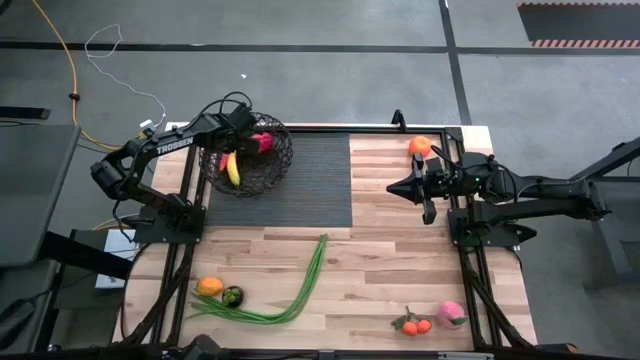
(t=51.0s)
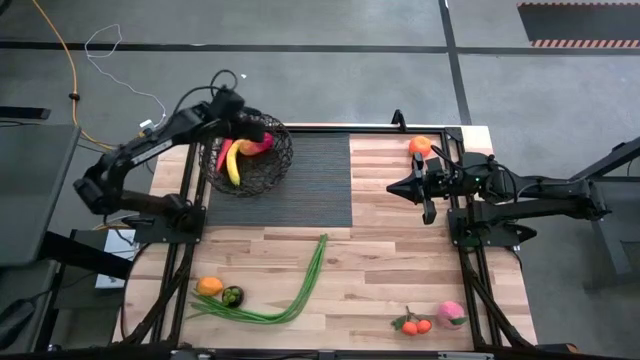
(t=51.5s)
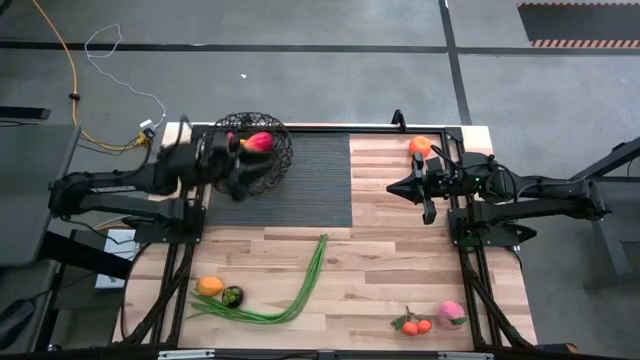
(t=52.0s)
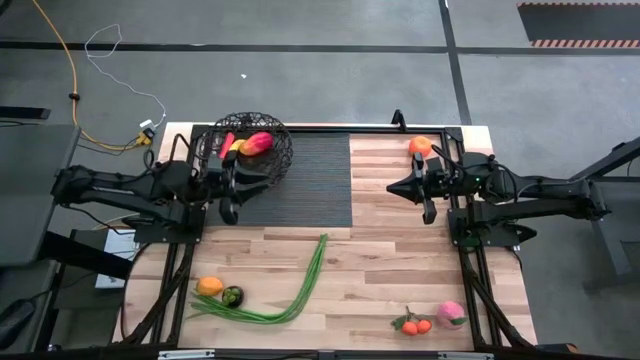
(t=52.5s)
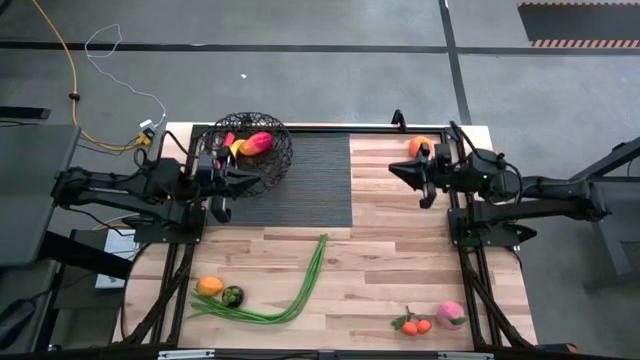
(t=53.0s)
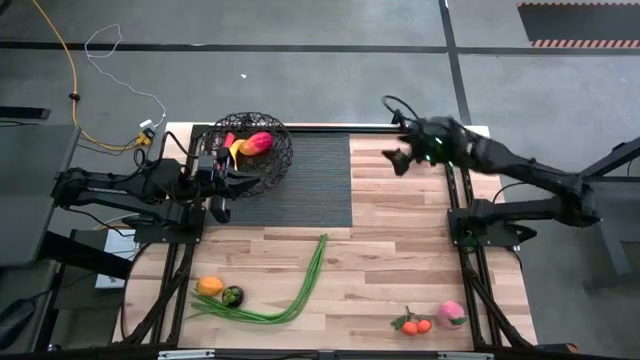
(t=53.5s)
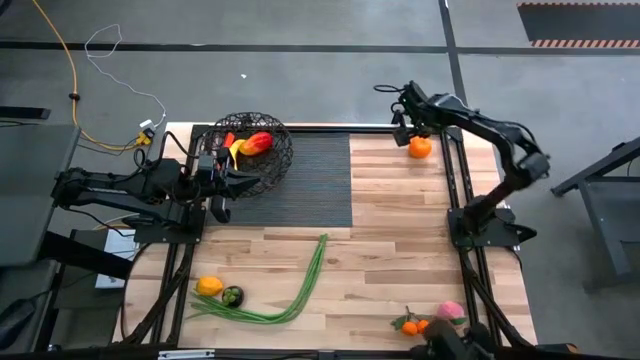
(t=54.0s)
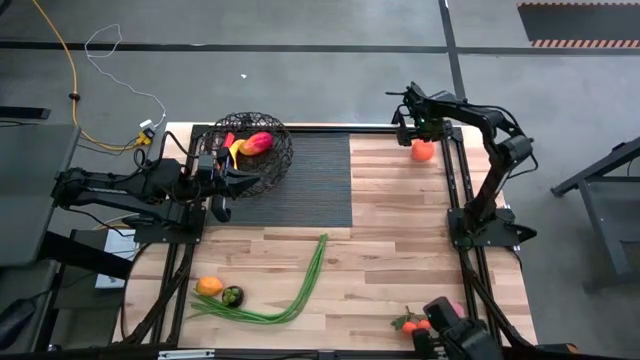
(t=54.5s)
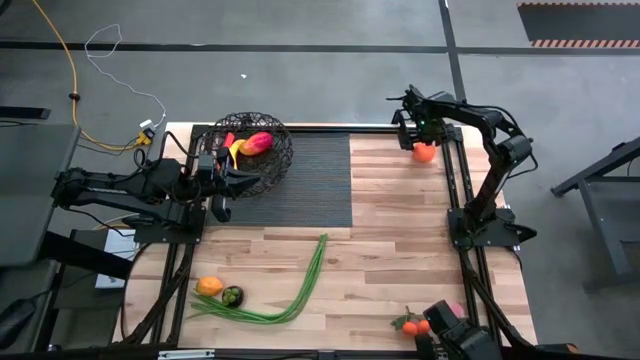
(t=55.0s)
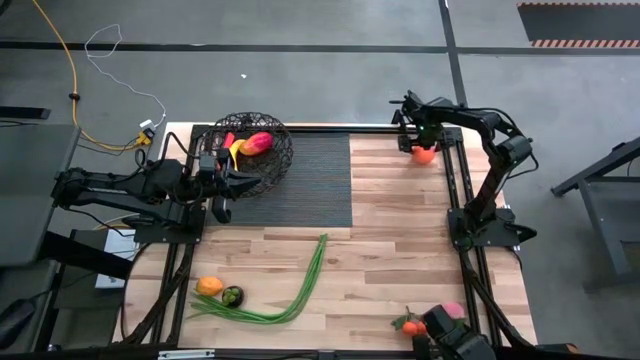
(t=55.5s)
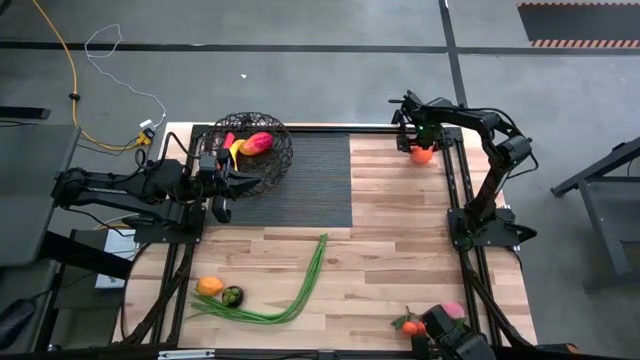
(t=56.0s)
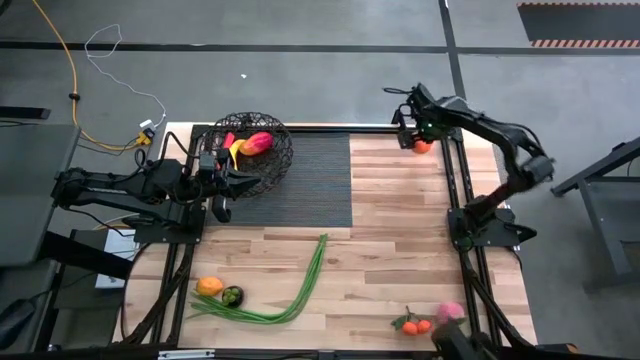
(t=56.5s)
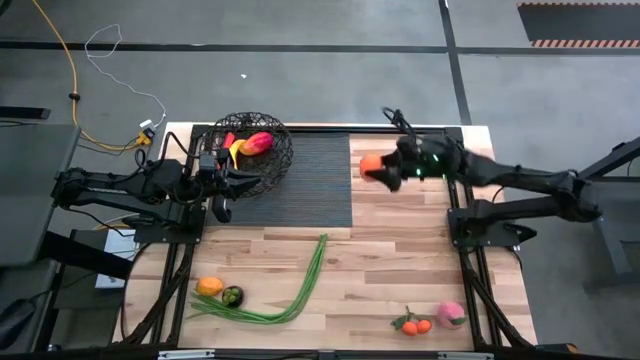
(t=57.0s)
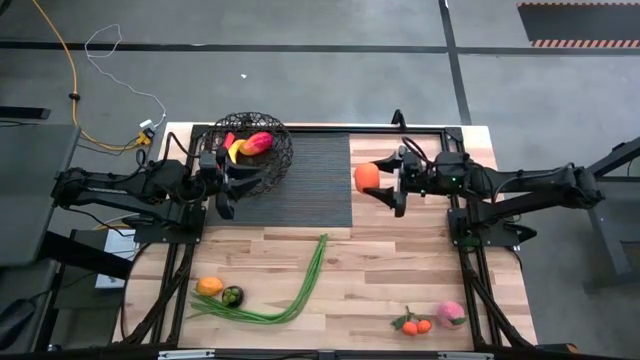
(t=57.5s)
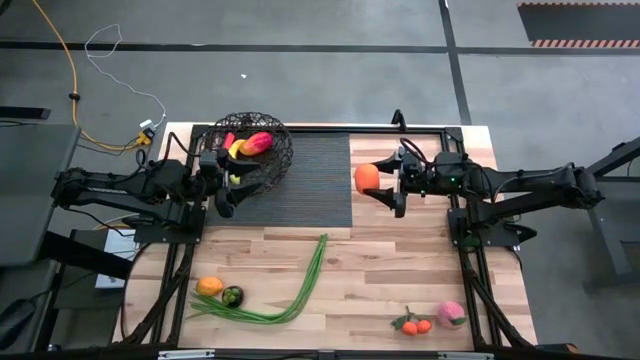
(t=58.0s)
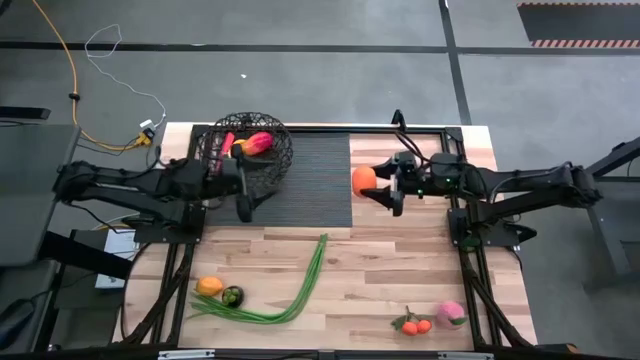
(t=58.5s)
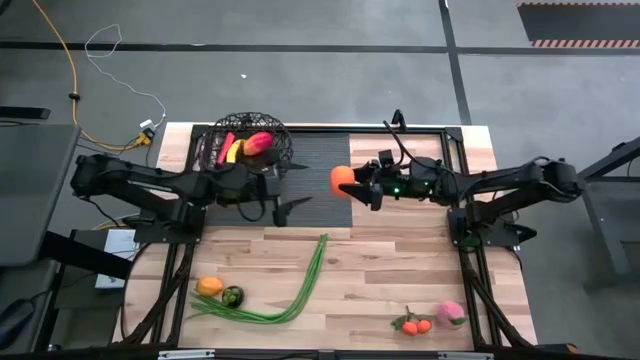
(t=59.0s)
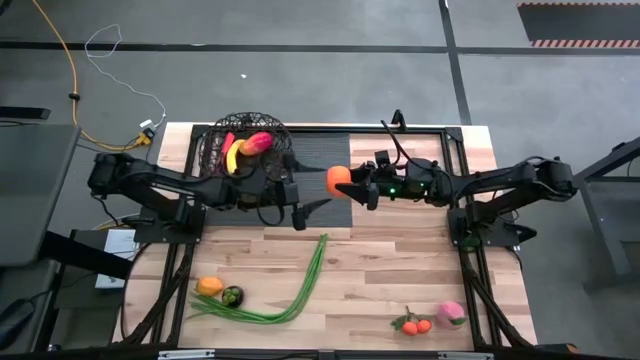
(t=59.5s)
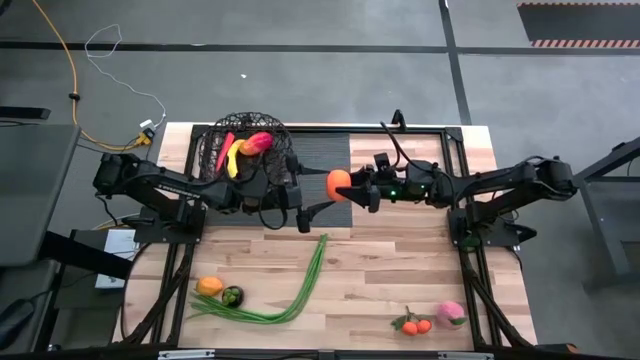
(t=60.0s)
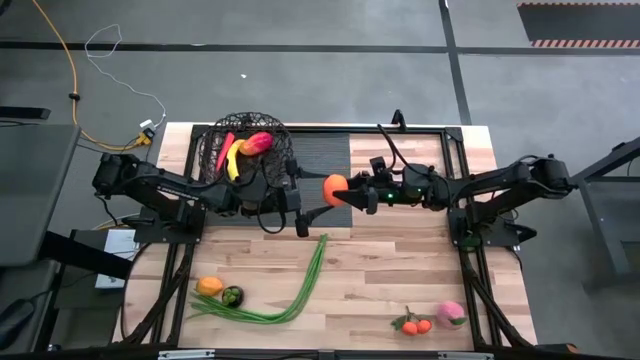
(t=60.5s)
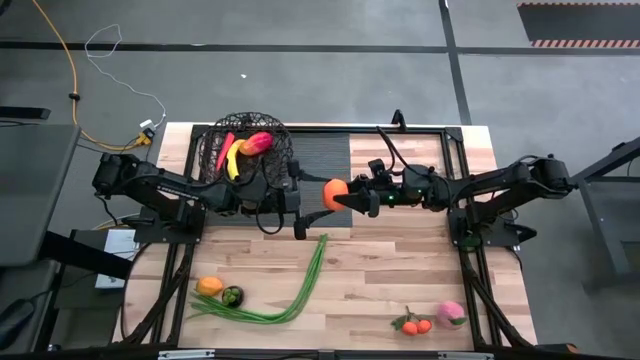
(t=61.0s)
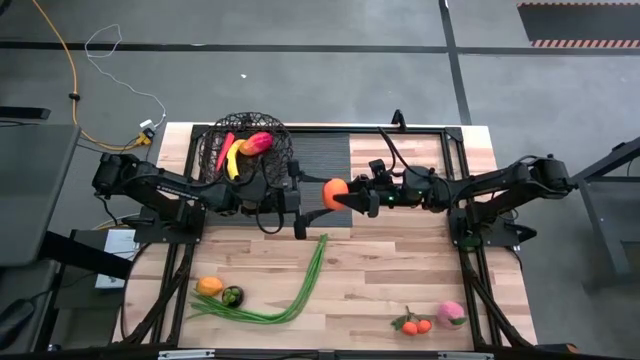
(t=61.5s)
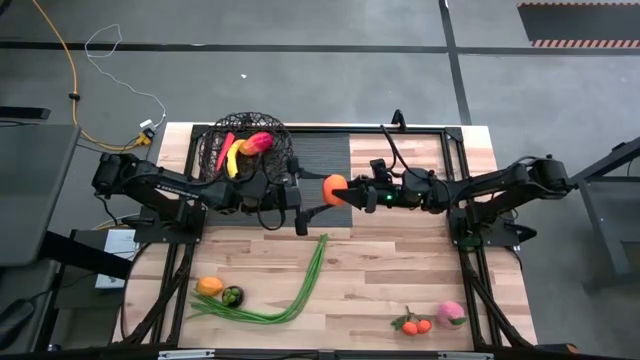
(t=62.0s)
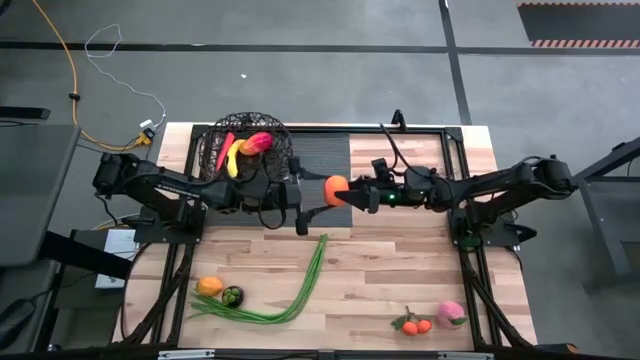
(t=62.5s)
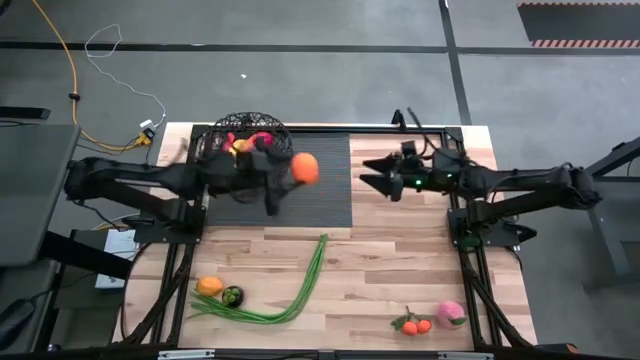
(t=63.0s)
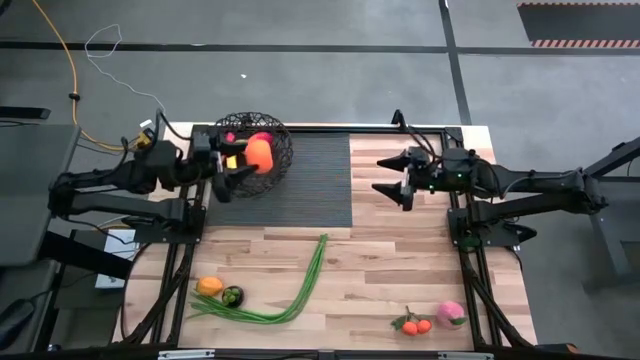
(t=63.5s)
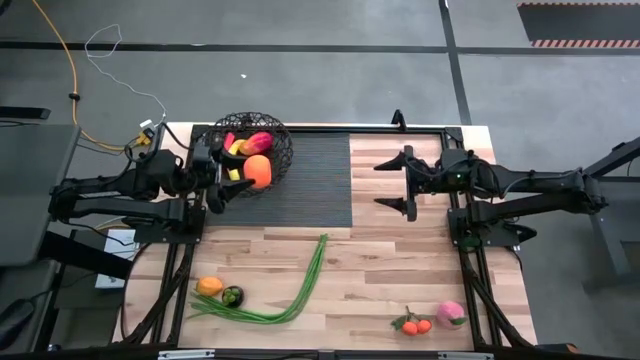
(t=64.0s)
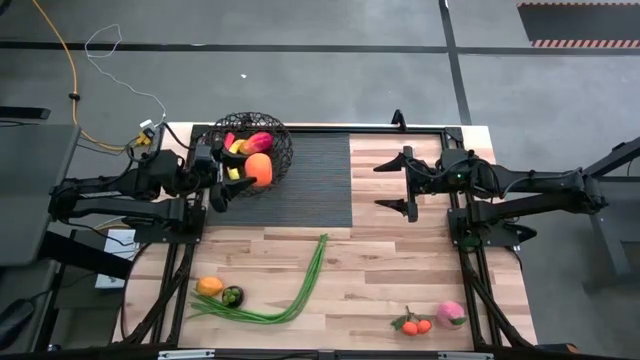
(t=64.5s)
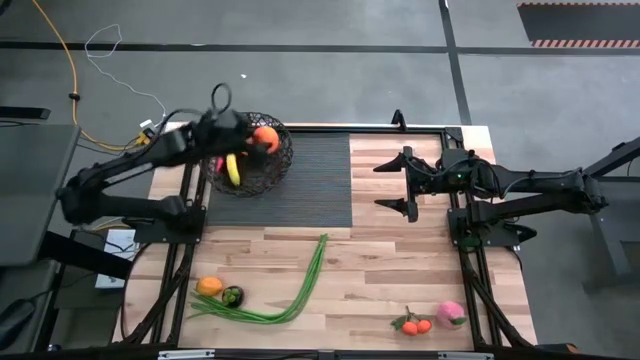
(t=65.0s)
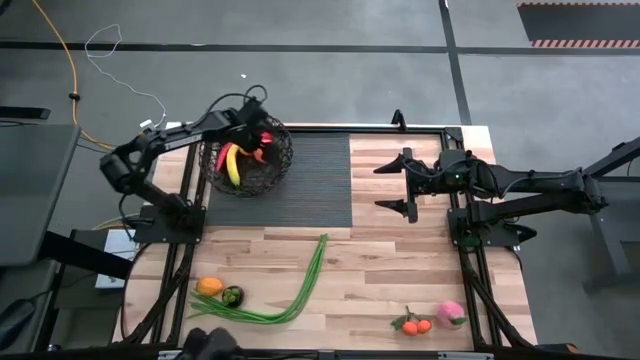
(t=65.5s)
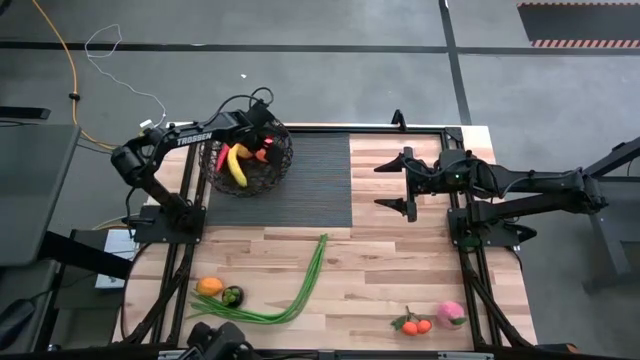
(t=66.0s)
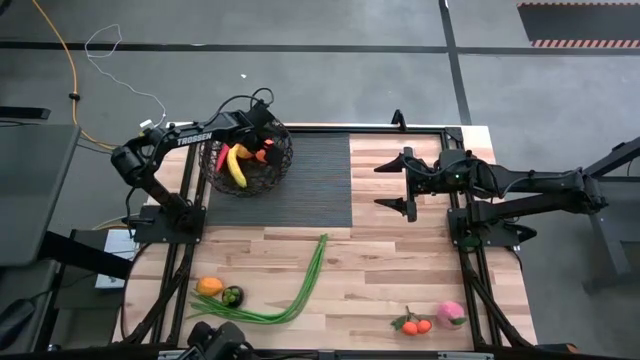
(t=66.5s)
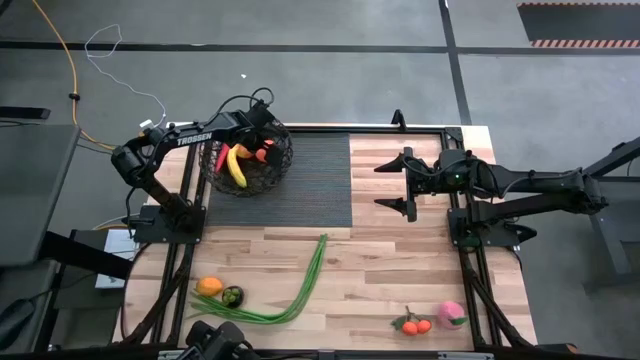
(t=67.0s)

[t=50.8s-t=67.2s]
Task: Build produce basket
Put the orange into the black basket

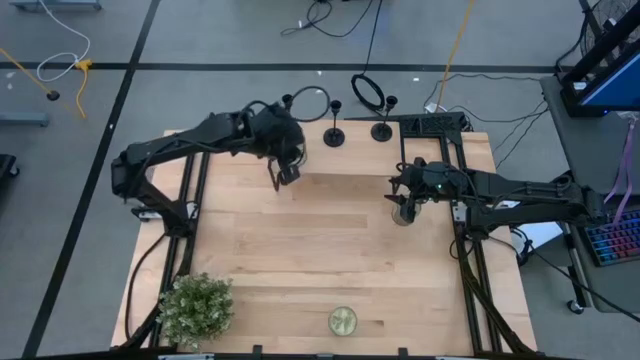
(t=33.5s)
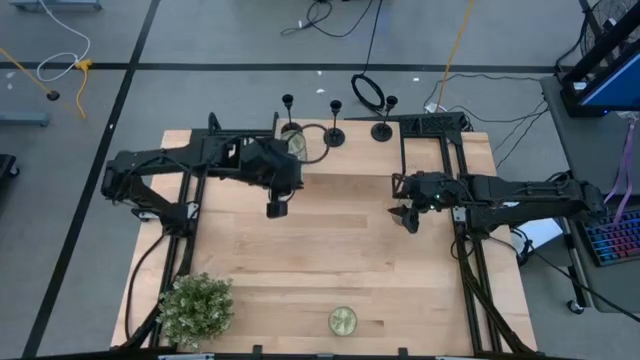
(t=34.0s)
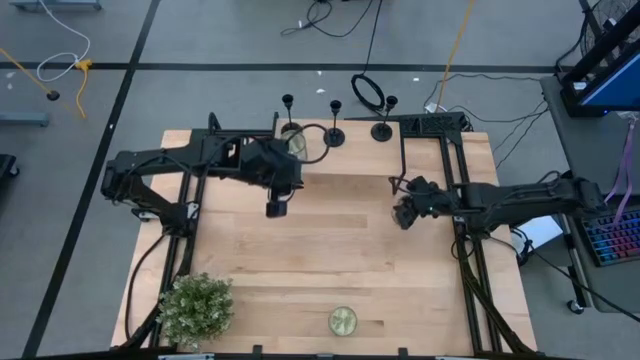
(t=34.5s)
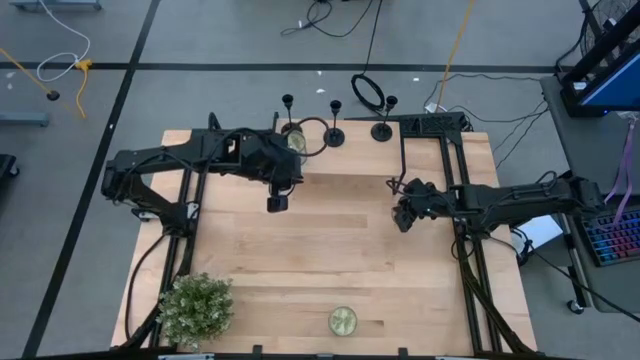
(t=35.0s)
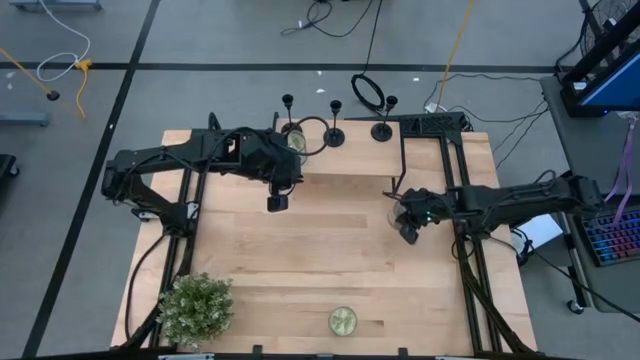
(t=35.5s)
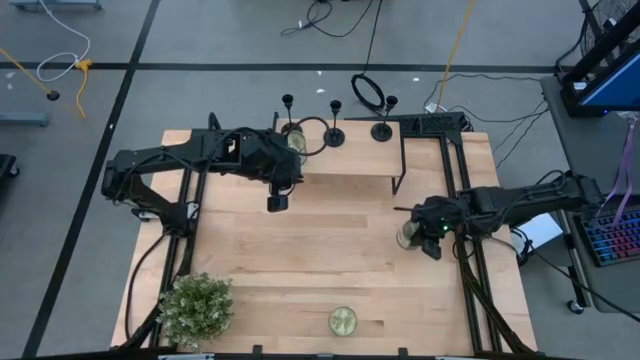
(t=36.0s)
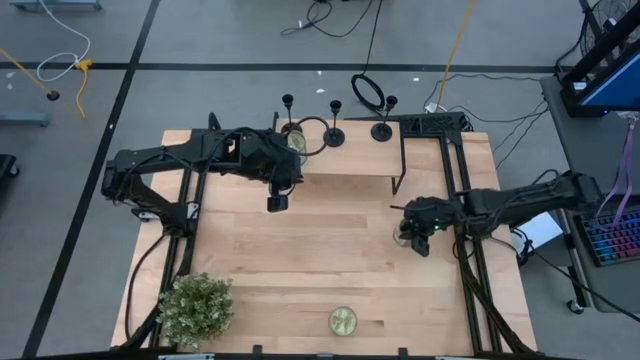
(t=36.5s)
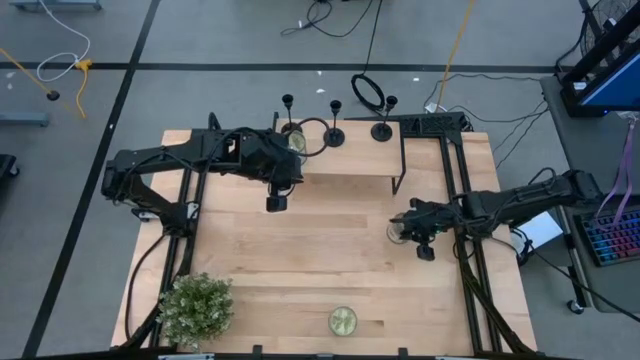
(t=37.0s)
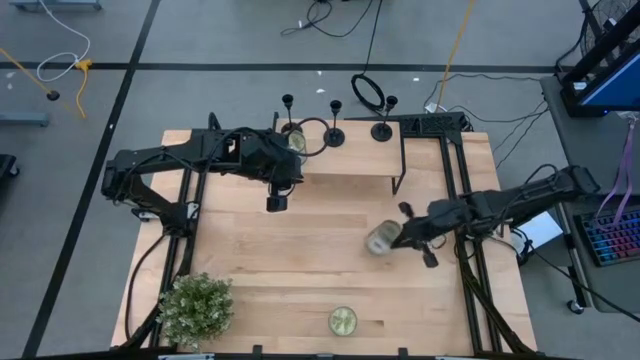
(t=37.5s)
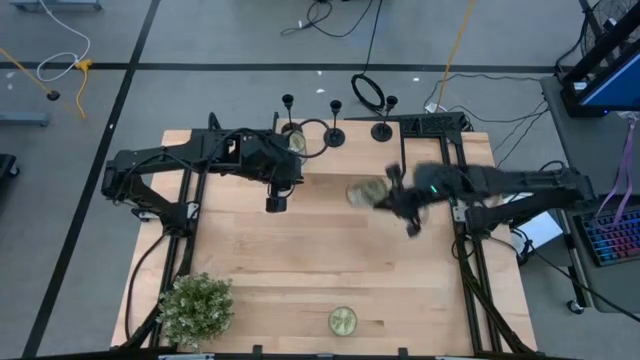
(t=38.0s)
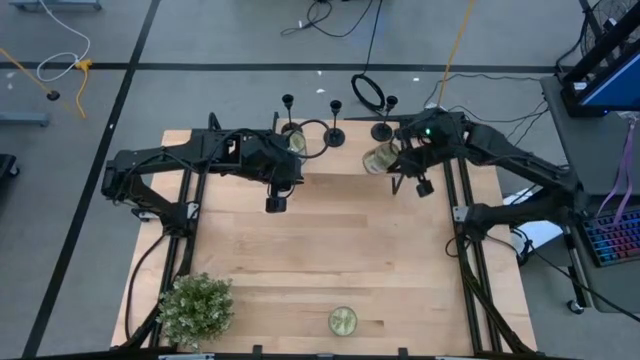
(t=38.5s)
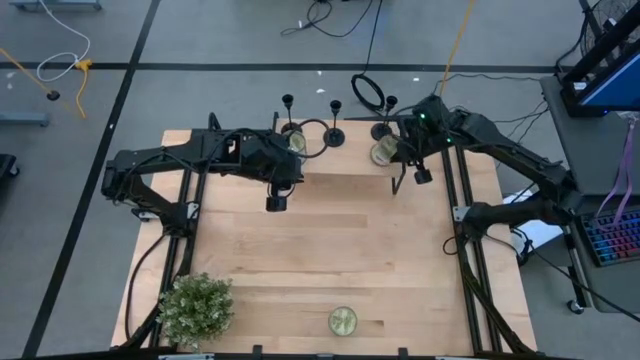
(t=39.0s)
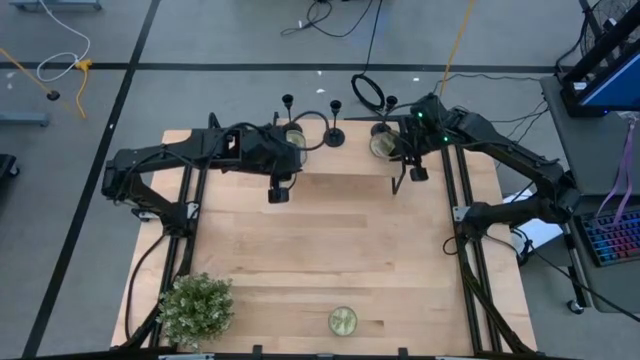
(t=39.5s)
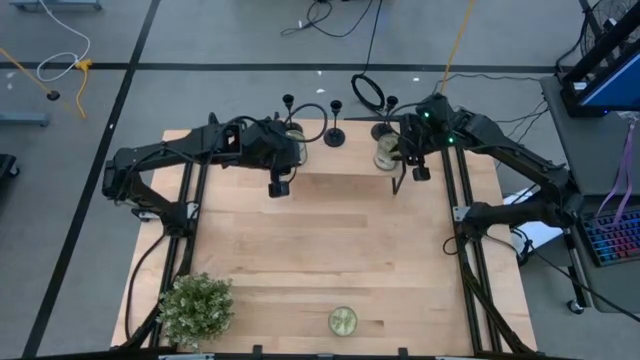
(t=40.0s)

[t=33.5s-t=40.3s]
Task: Pick & Place candle stick holders
Put the top light green scented candle on the shelf
